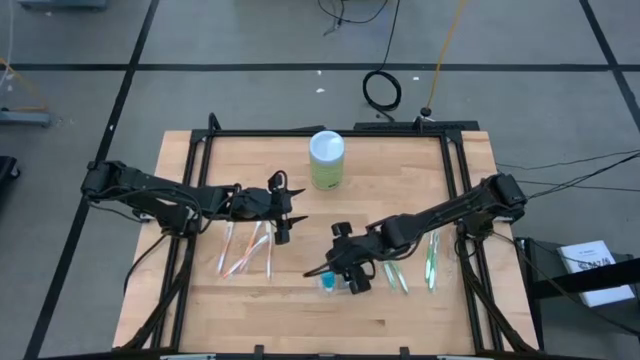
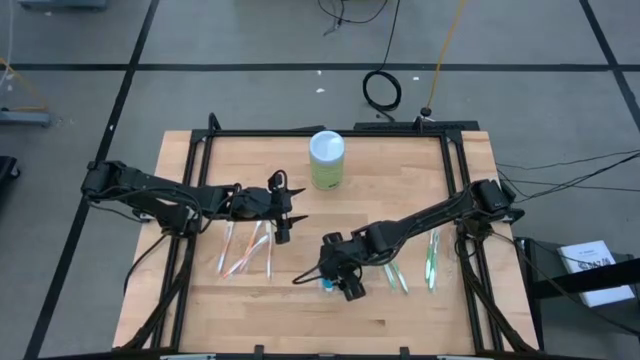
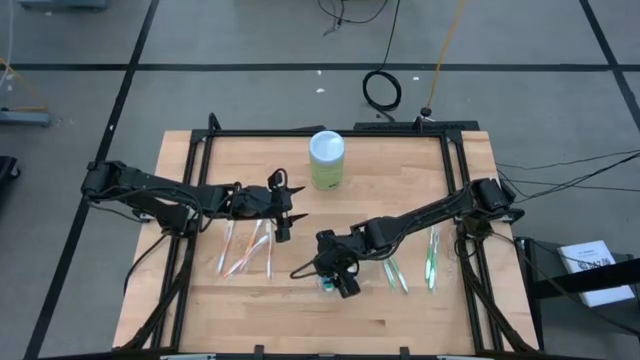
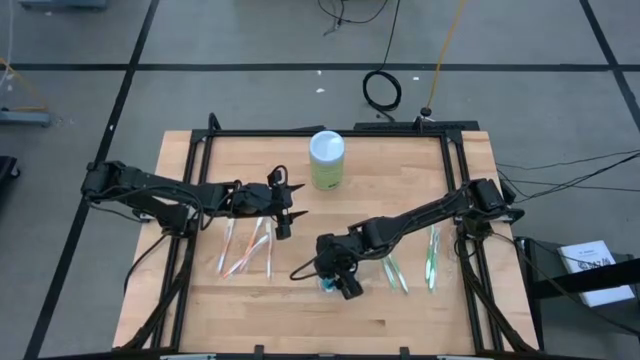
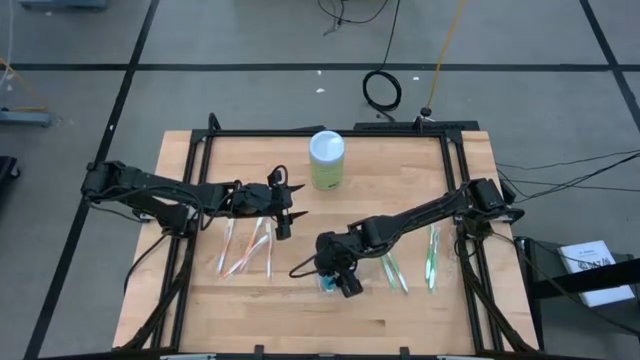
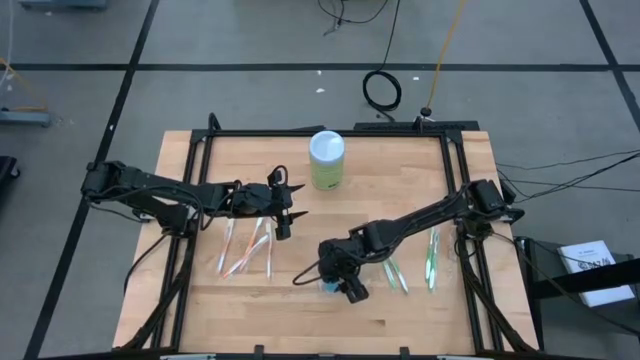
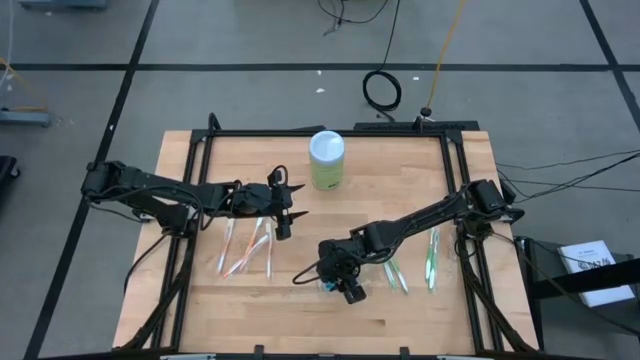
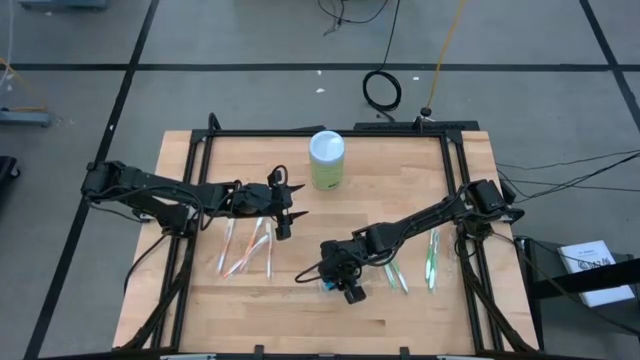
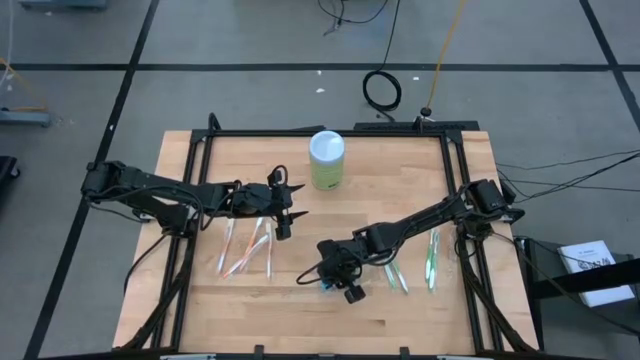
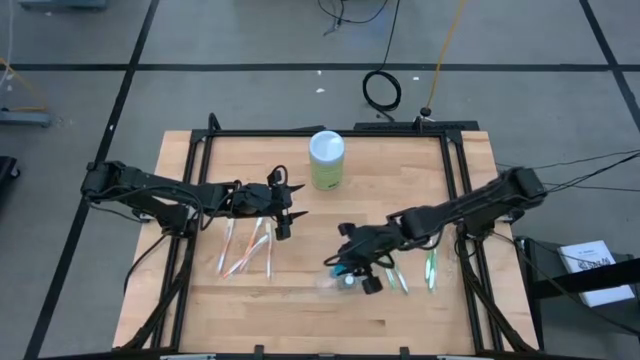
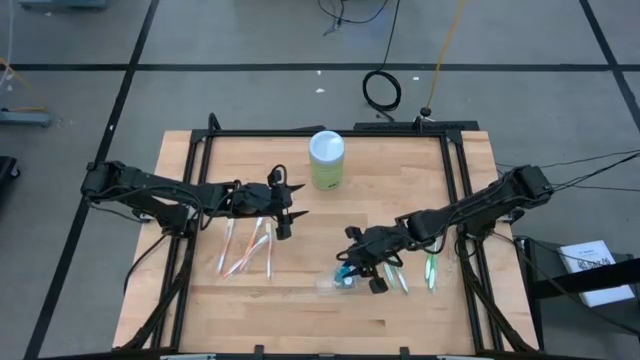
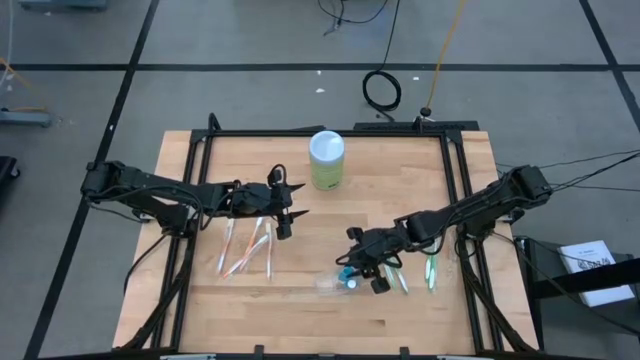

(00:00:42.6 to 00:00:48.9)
Task: Pick & Place toothbrushing station
Put the mouthwash into the middle center of the transparent organizer

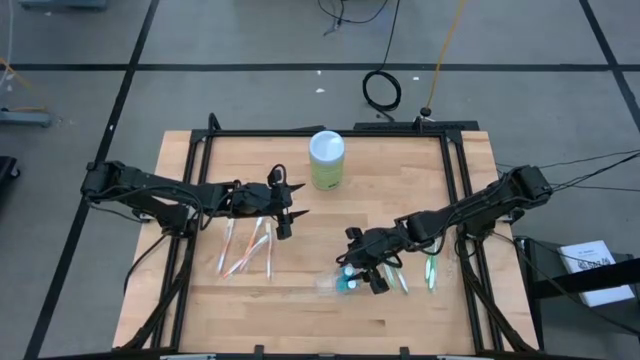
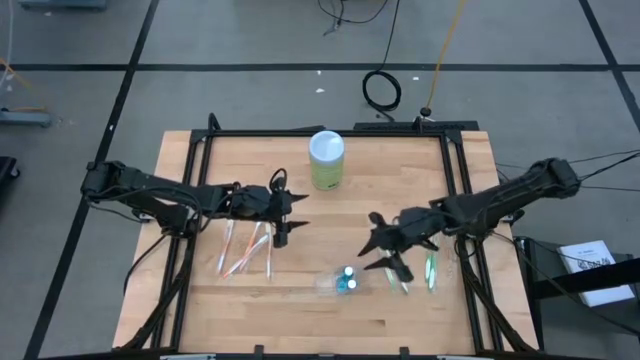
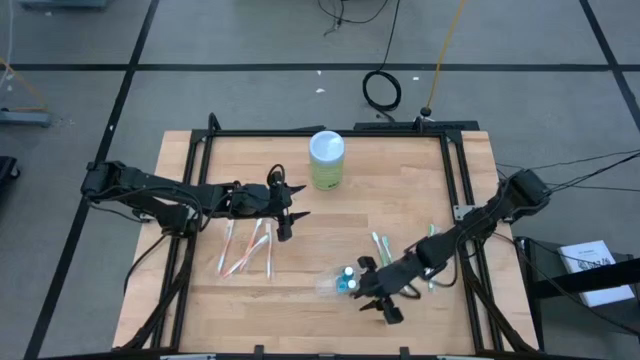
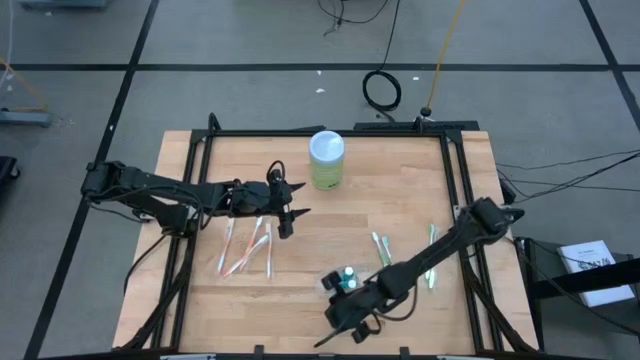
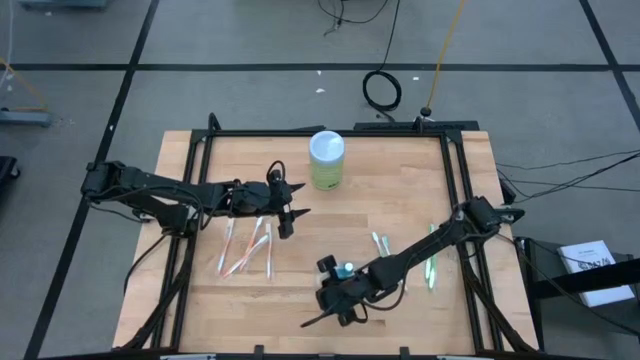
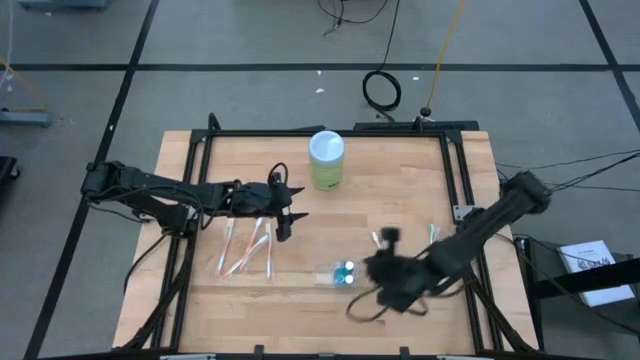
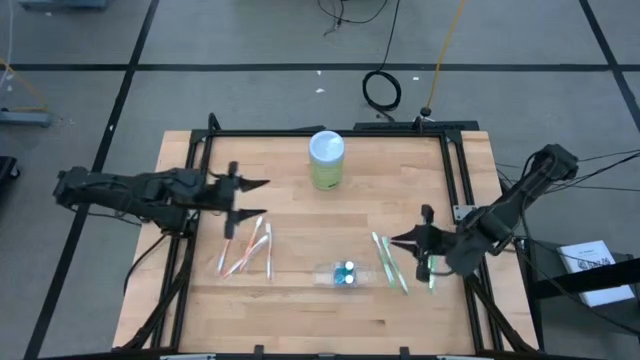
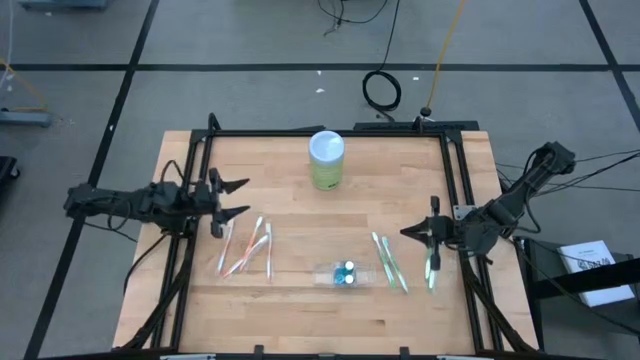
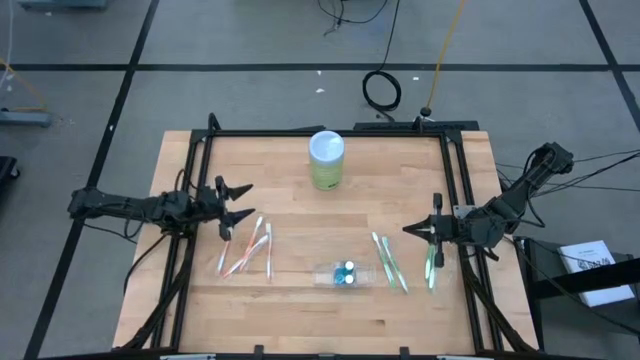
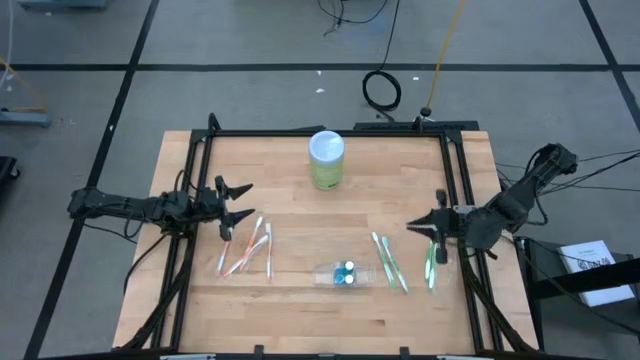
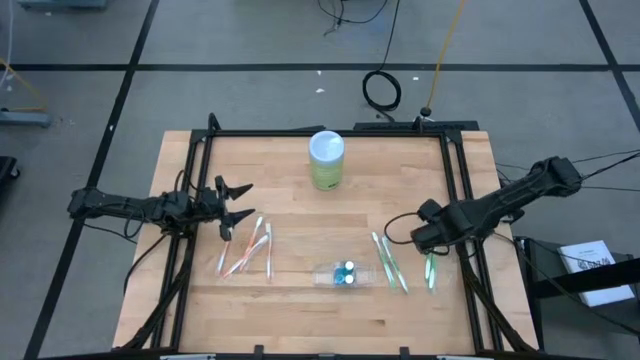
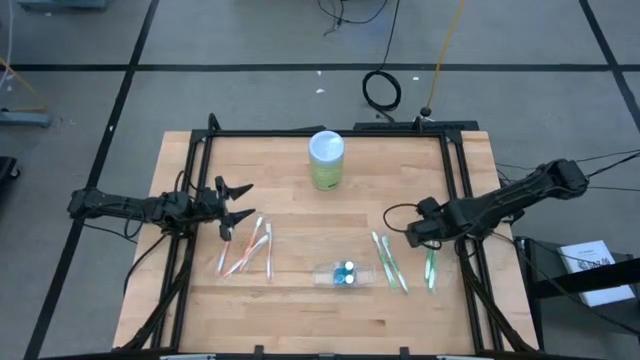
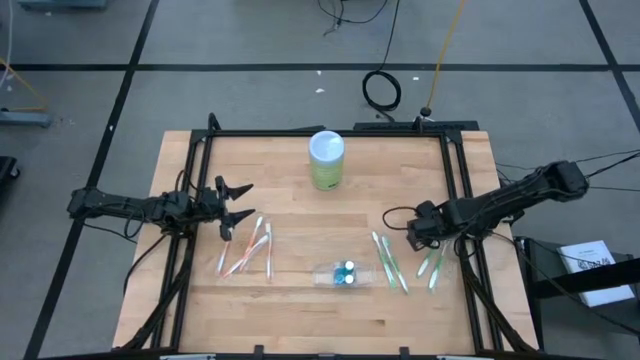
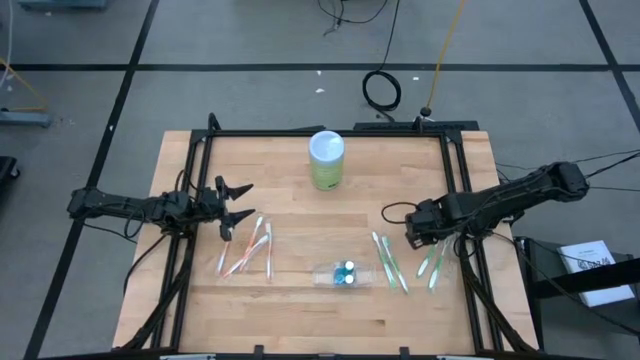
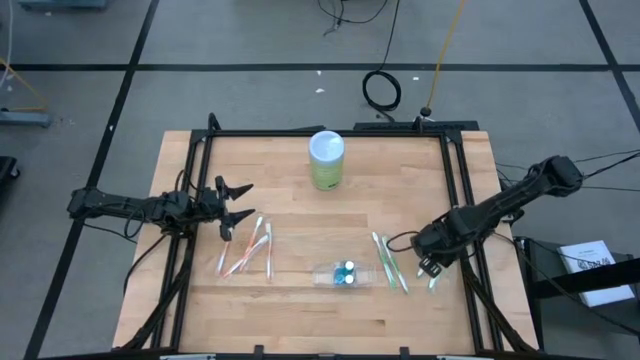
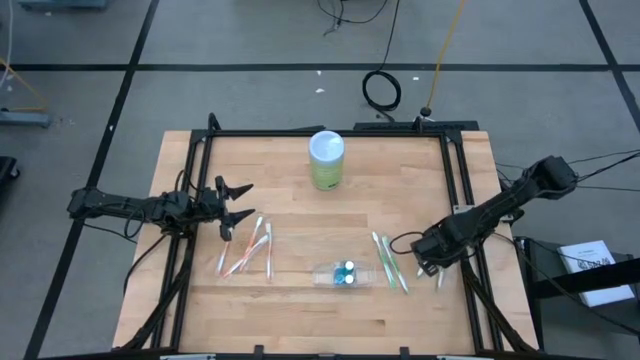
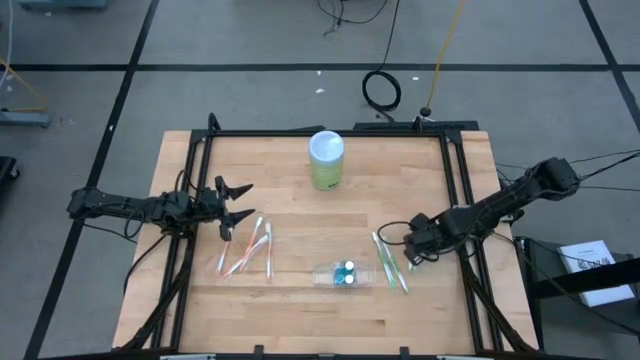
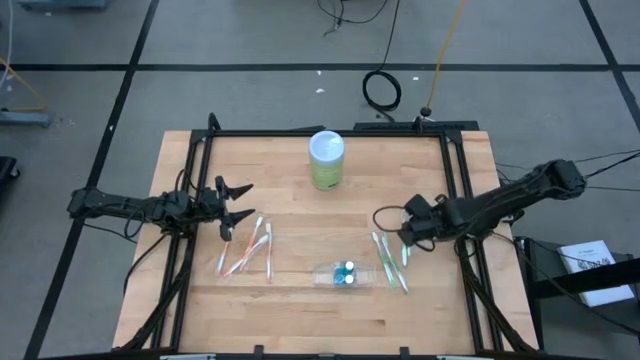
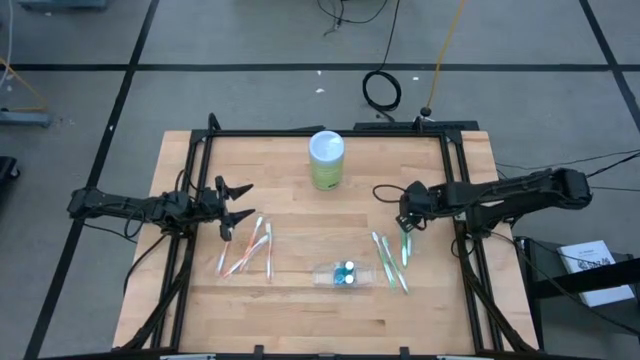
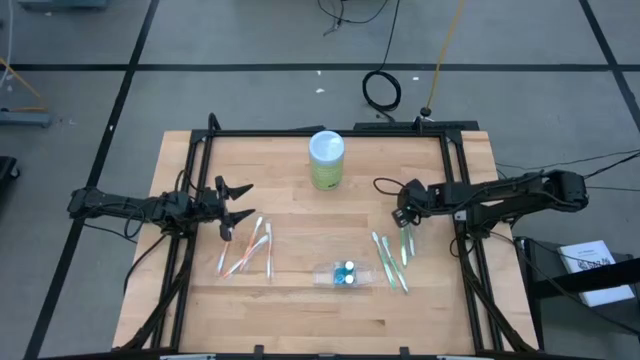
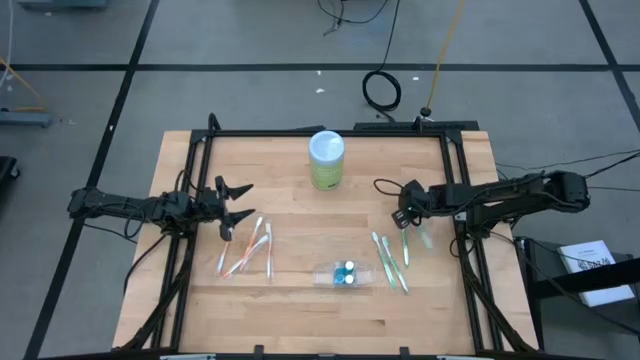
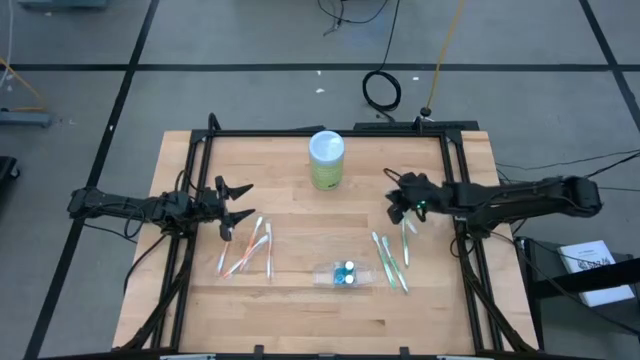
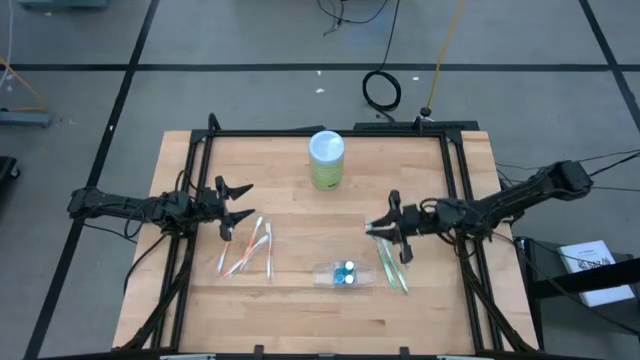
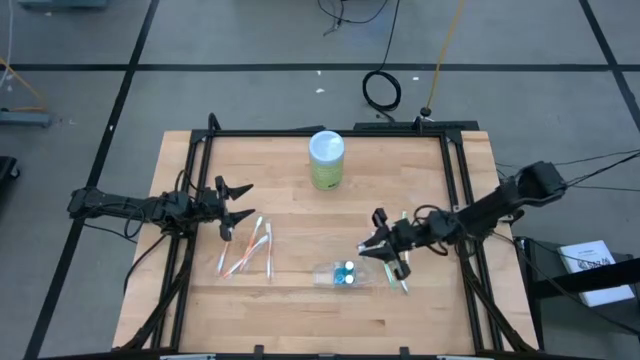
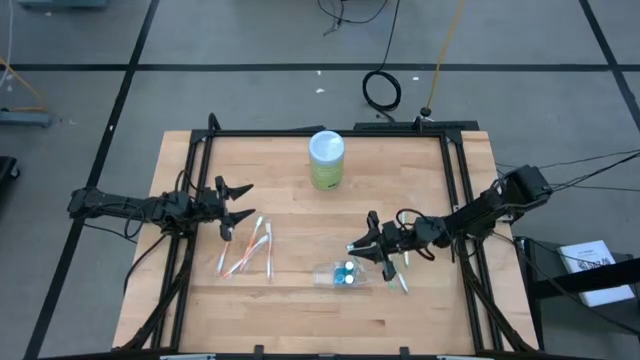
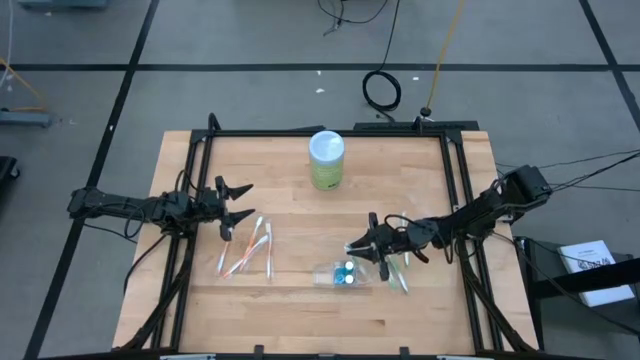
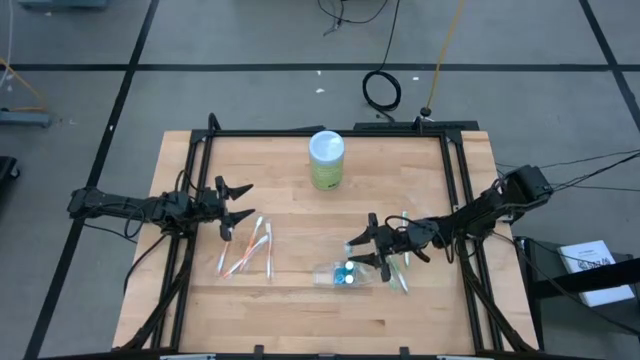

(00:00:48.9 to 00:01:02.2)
Put the green toothbrush into the right section of the transparent organizer

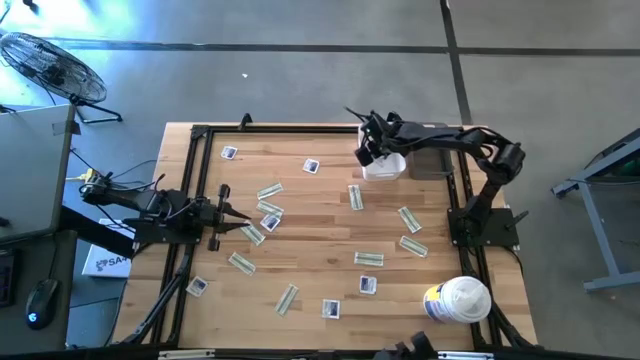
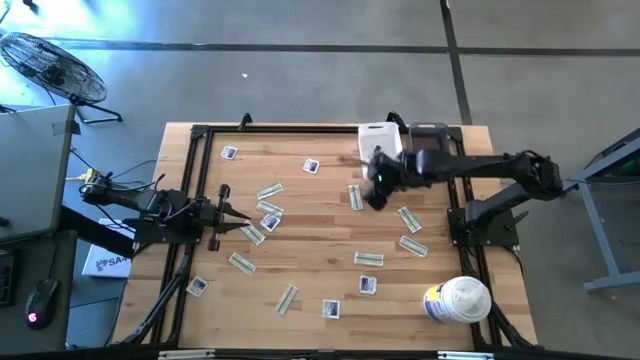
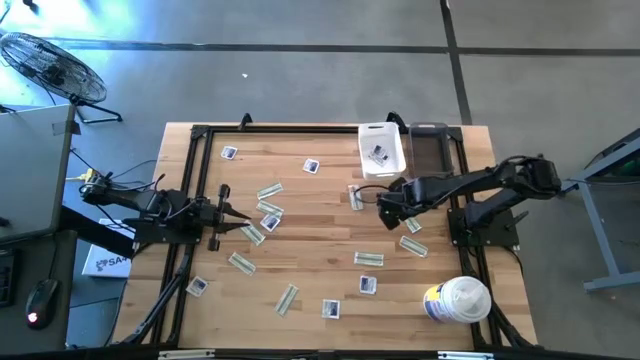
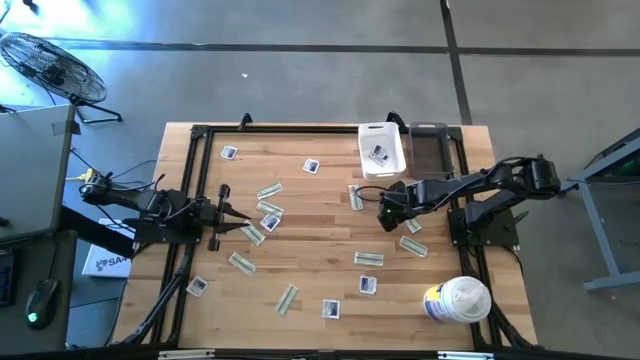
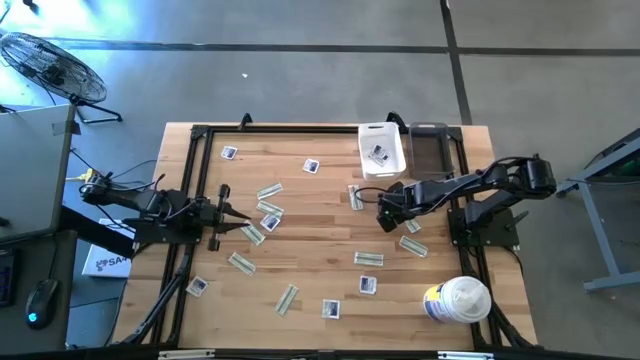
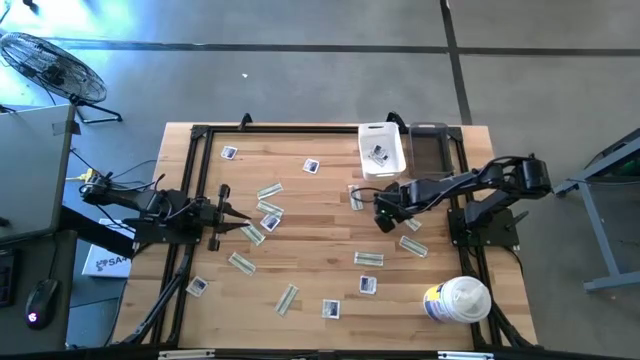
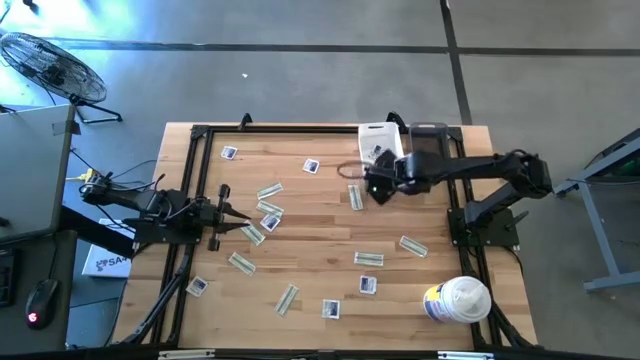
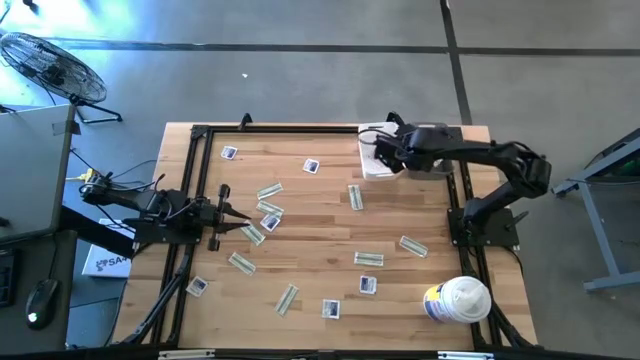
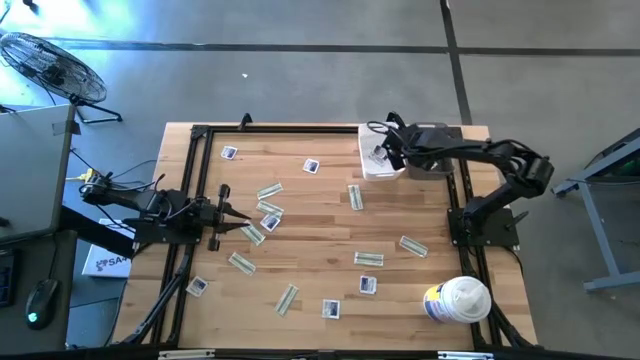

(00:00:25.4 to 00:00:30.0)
Task: Pick & Place First Aid Supplies
Put the bandage into the gray bin
